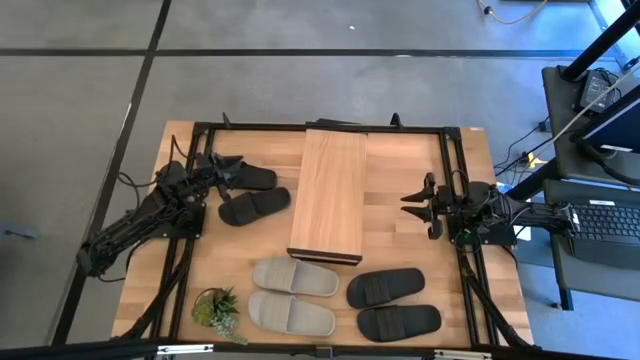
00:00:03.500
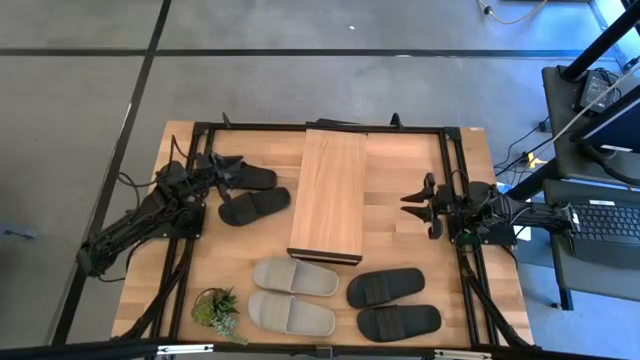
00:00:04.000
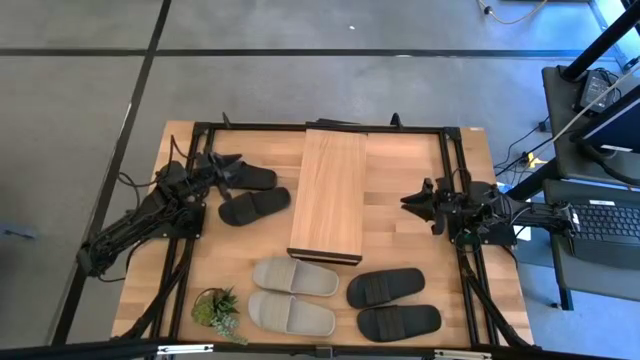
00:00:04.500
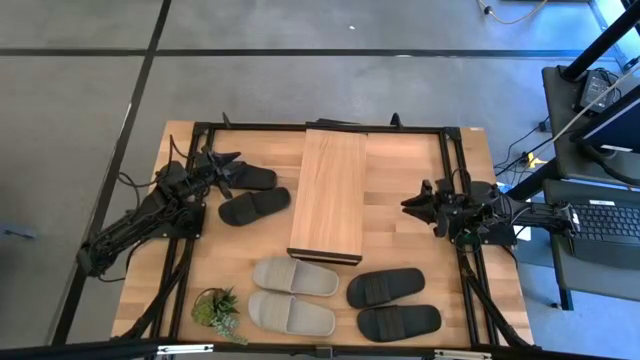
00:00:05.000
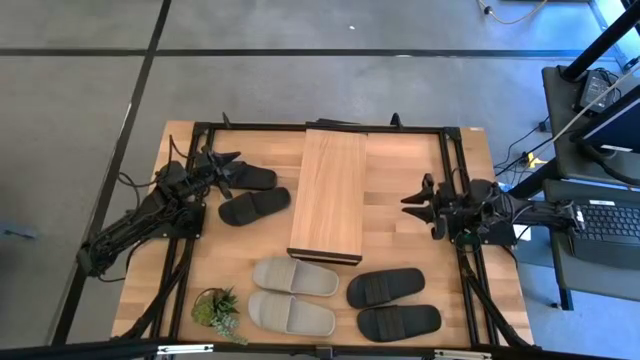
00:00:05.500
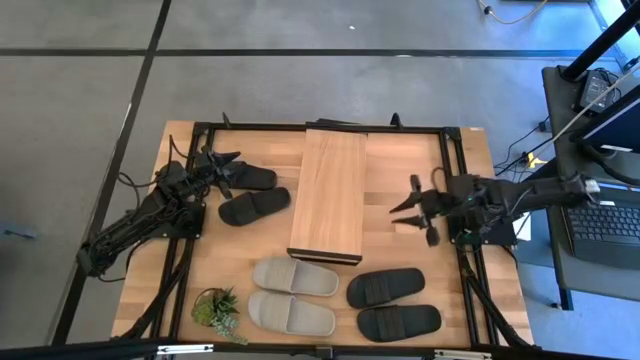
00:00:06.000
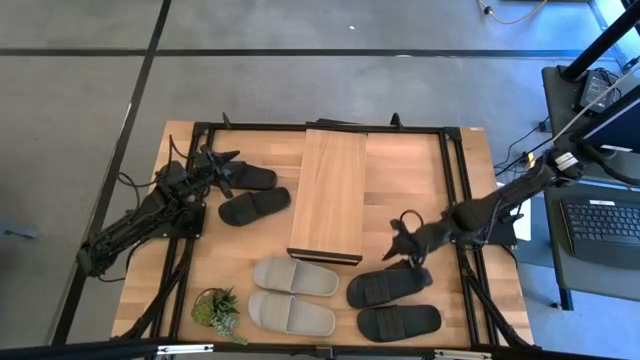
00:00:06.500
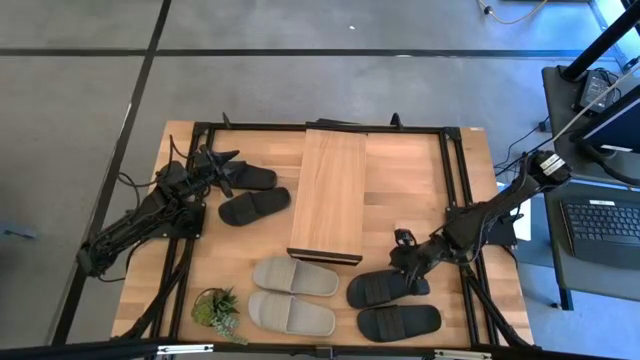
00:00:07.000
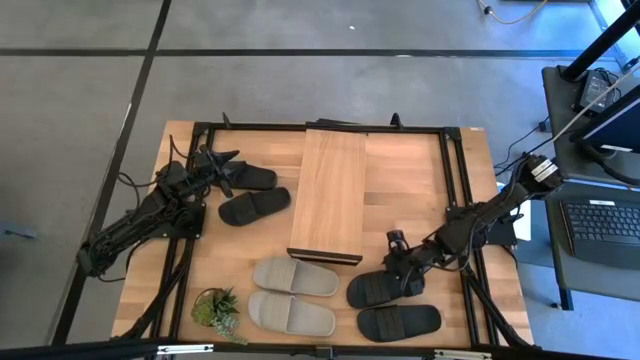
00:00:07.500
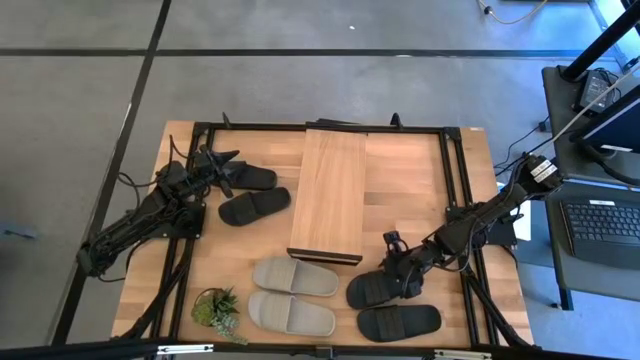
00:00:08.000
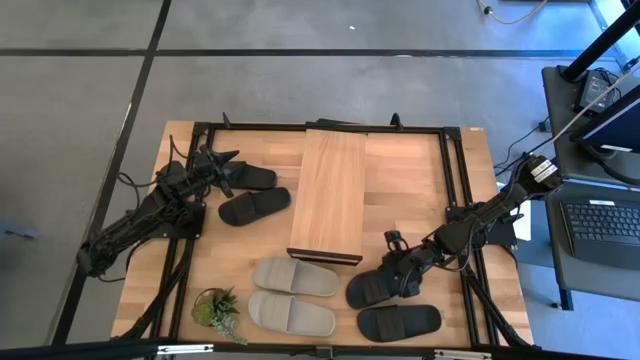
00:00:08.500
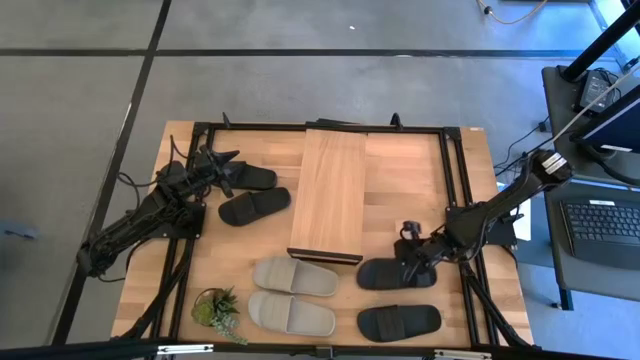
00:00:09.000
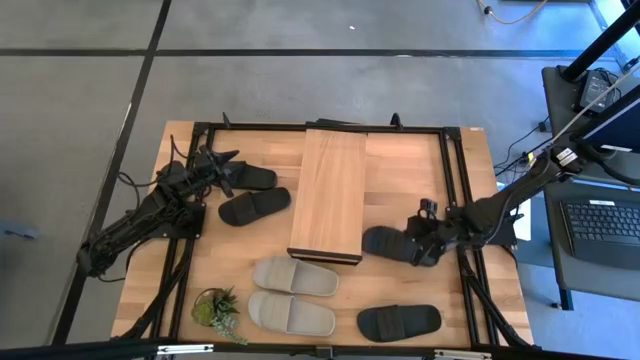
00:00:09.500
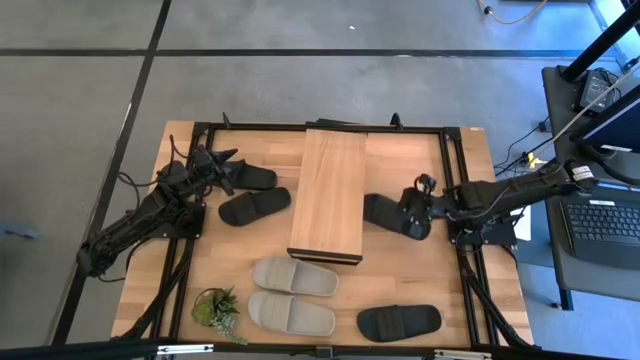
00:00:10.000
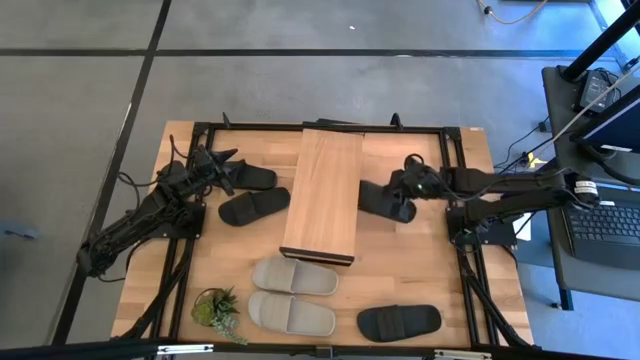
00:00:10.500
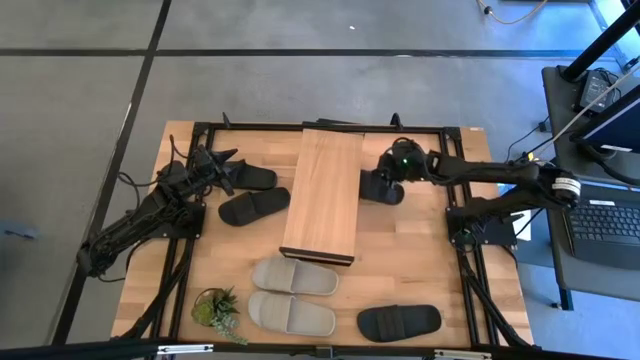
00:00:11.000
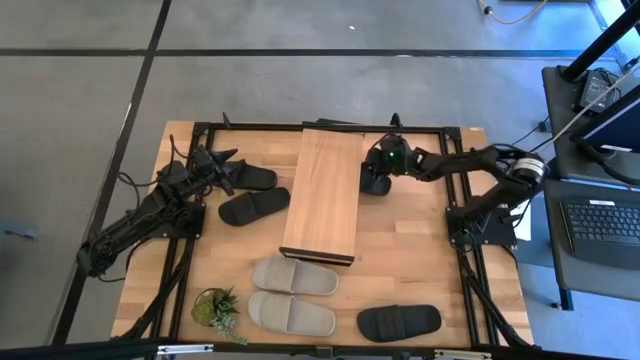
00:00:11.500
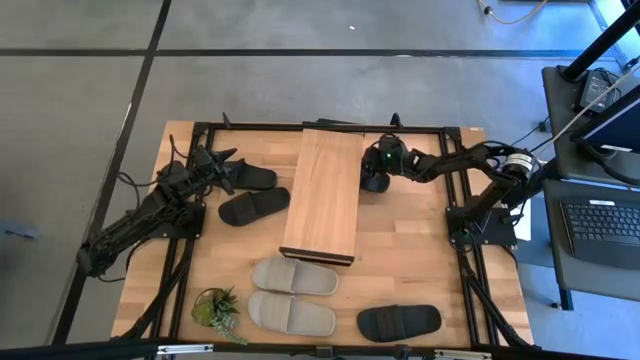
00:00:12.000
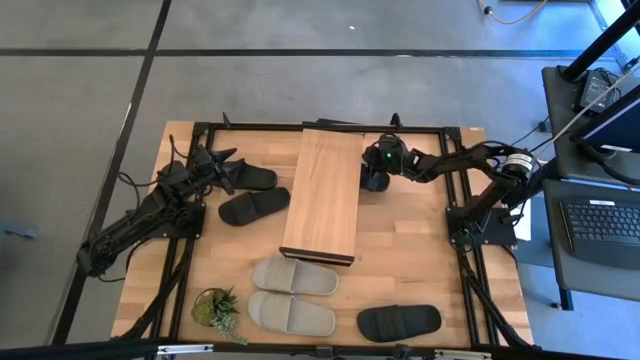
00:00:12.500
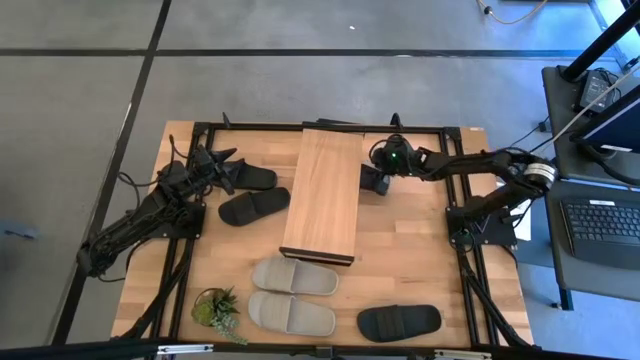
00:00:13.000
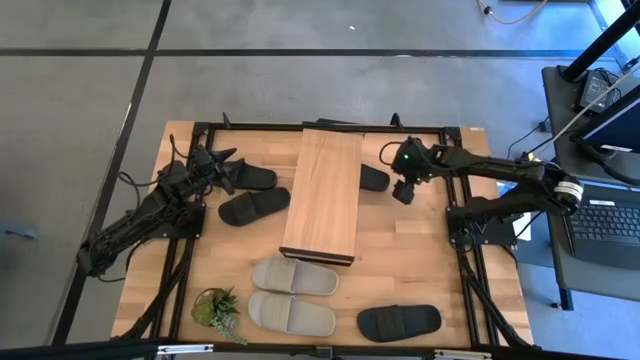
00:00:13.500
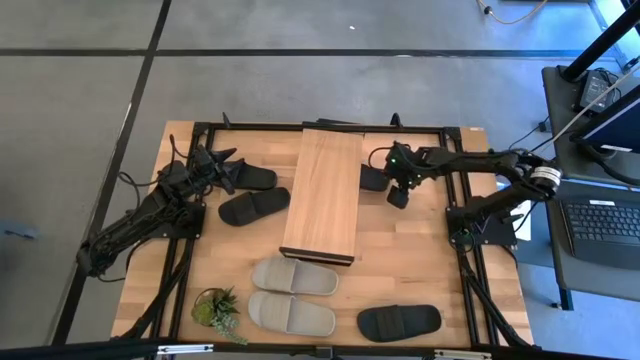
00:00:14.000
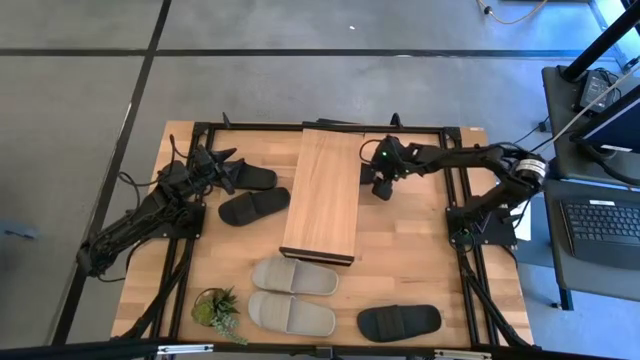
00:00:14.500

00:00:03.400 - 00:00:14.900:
Task: Pick and place slides into the shelf
Put the top right black slide under the shelf

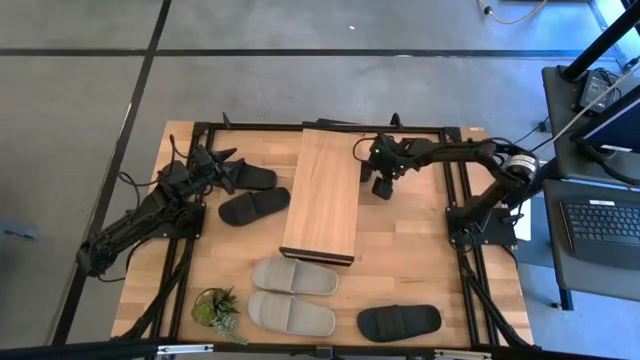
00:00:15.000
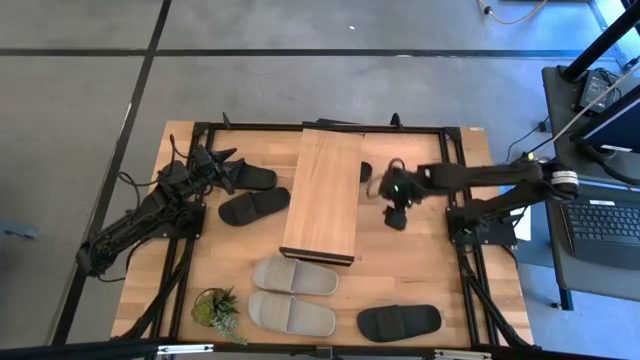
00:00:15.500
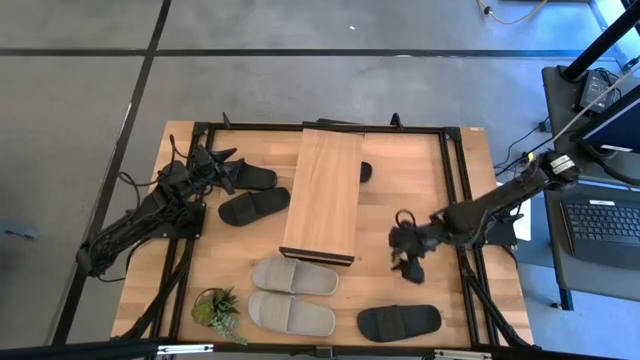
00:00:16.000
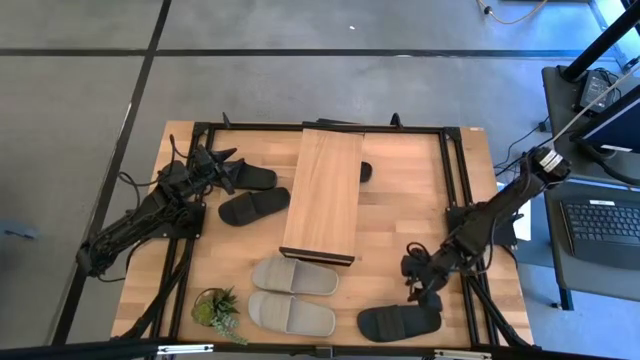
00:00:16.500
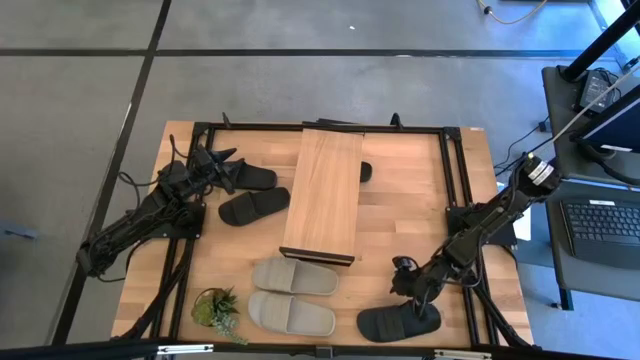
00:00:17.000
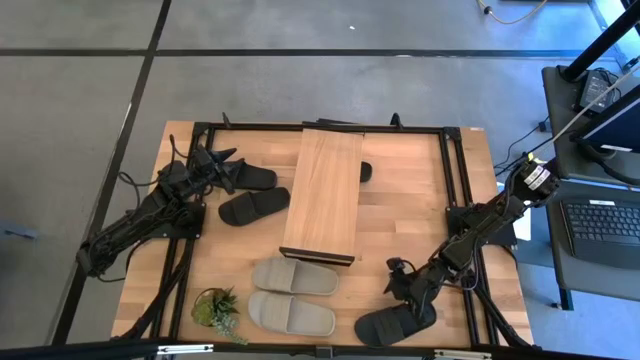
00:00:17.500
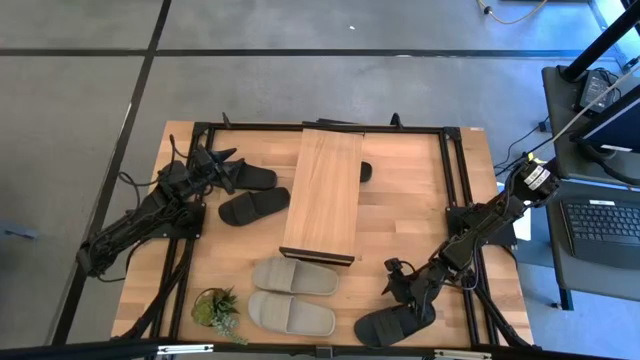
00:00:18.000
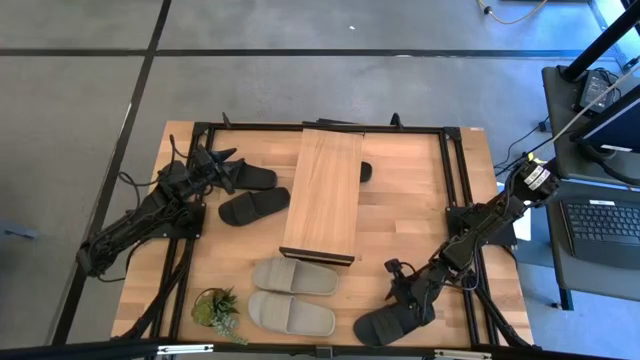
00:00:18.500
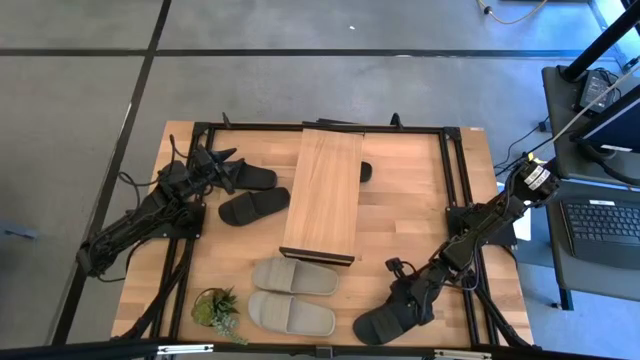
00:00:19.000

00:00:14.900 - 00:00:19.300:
Put the bottom right black slide under the shelf

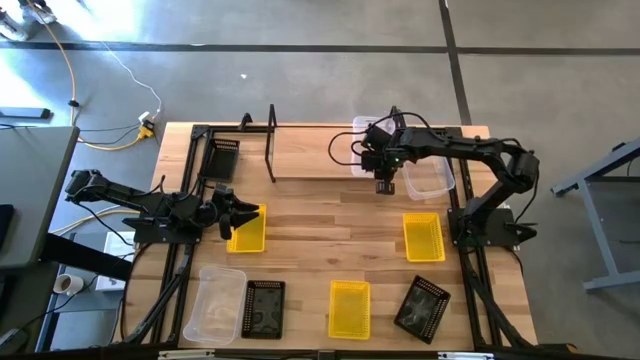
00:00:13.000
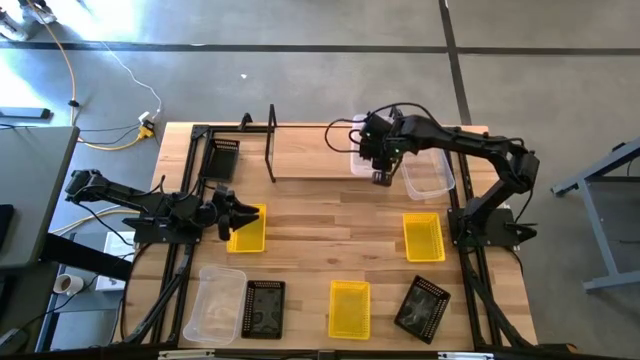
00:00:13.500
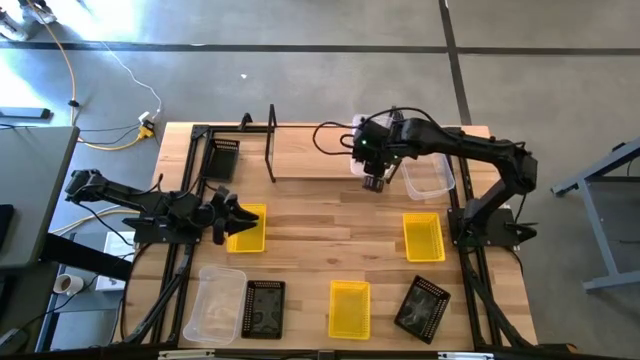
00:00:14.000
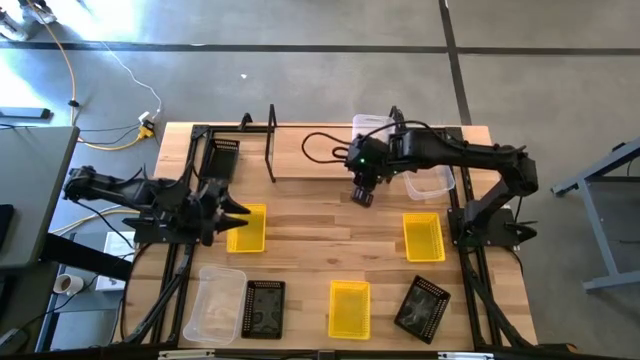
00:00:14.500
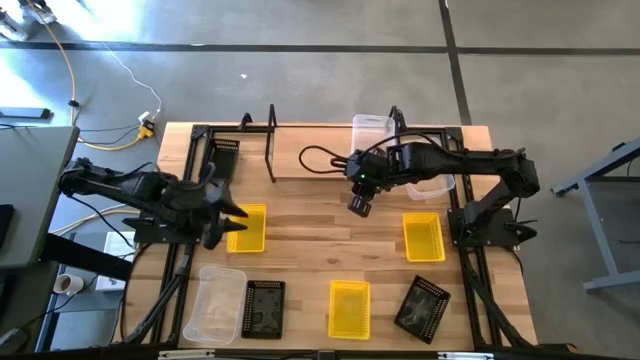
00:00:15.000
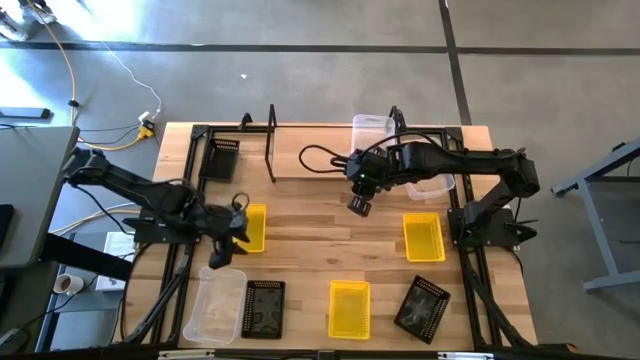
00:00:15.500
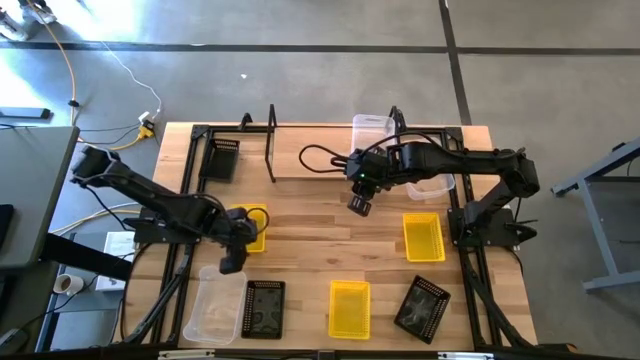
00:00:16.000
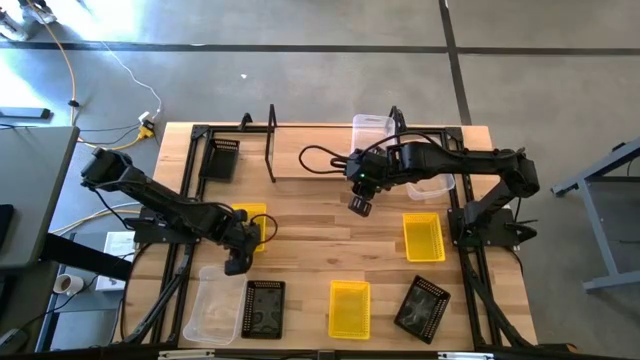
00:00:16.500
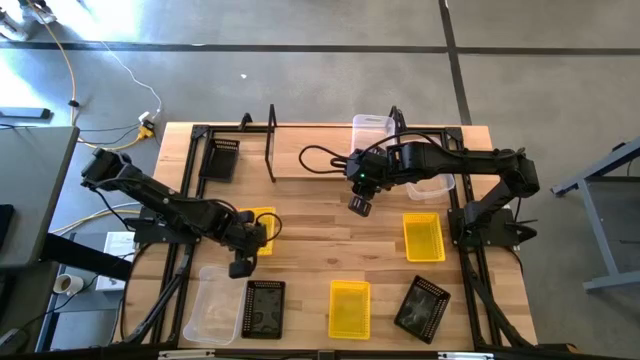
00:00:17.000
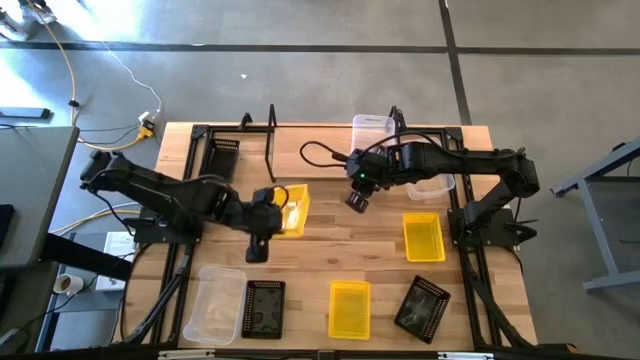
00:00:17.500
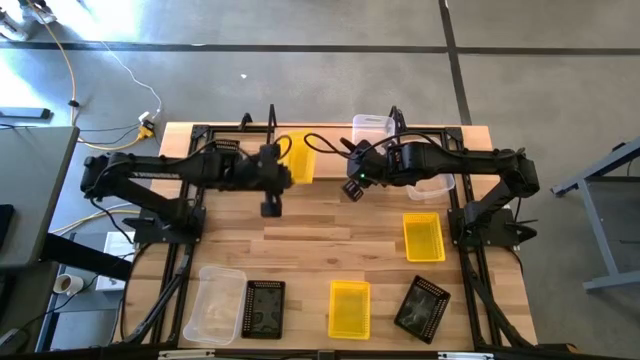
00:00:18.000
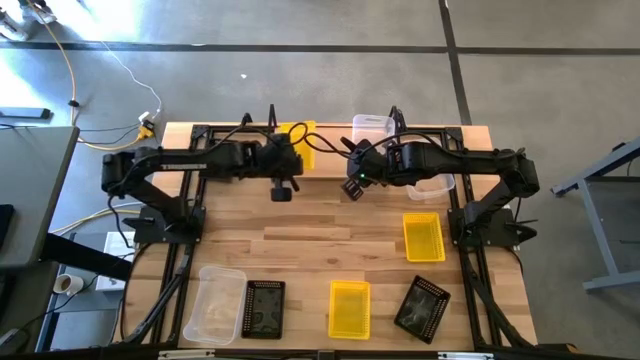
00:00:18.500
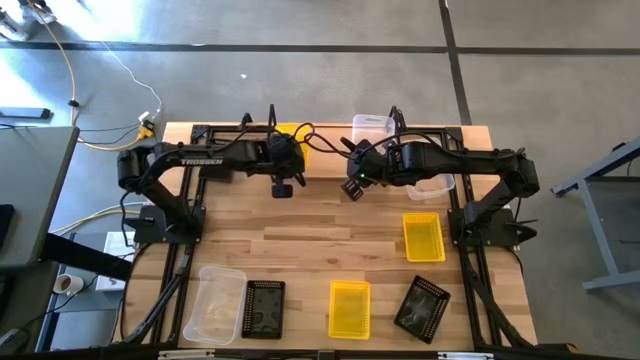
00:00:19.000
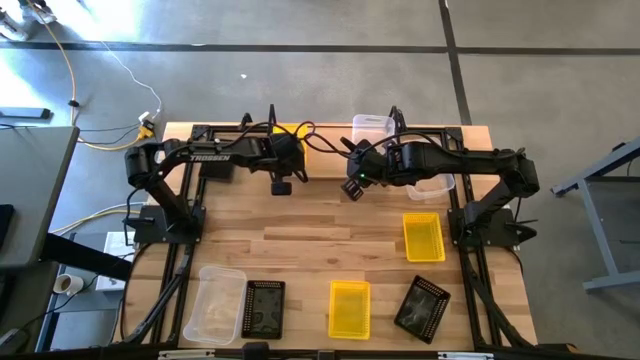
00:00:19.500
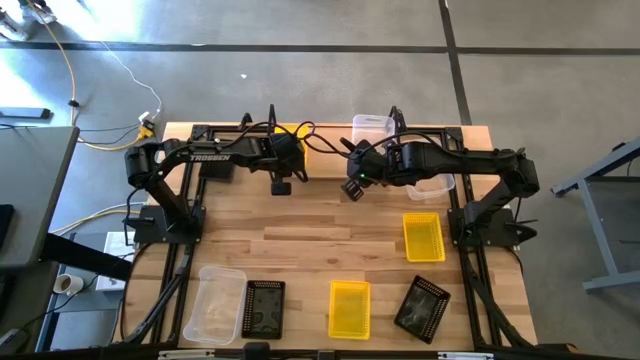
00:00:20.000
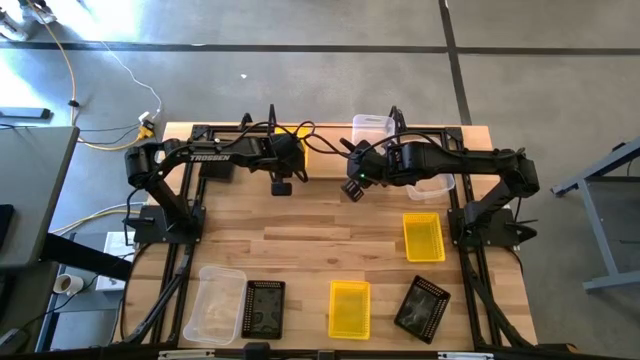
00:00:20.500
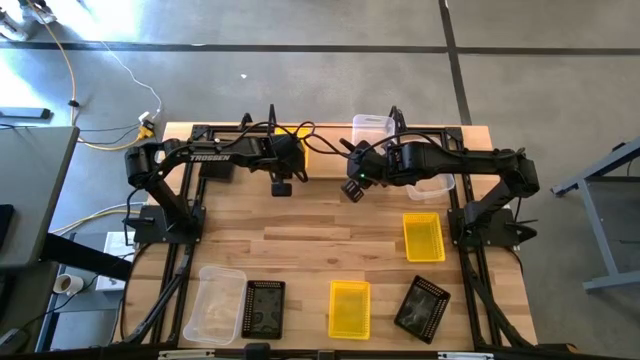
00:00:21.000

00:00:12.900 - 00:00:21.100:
Task: Stack baskets on shelf by color
Put the top left yellow bin on the shelf
